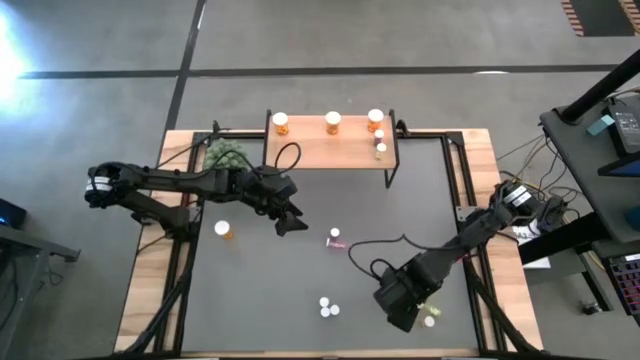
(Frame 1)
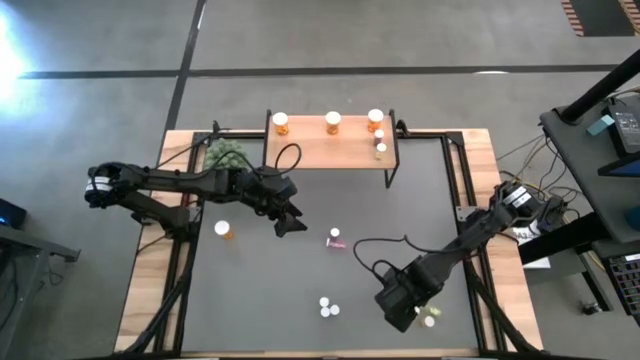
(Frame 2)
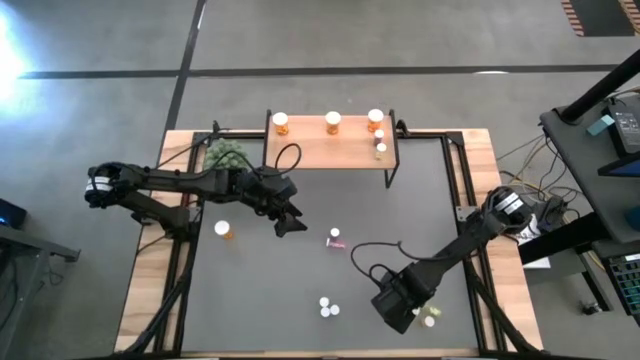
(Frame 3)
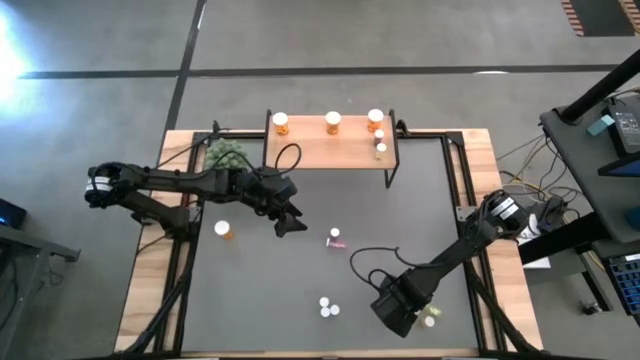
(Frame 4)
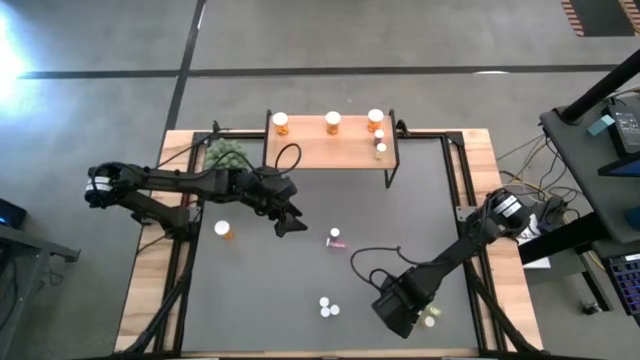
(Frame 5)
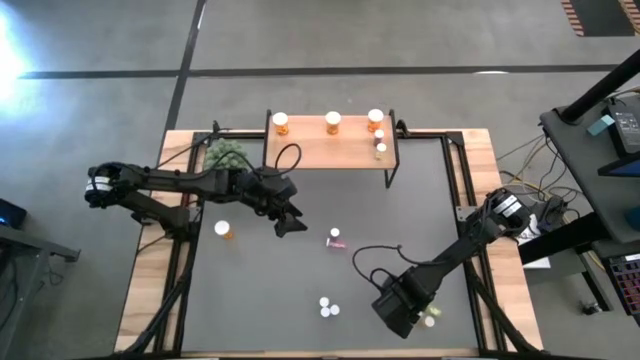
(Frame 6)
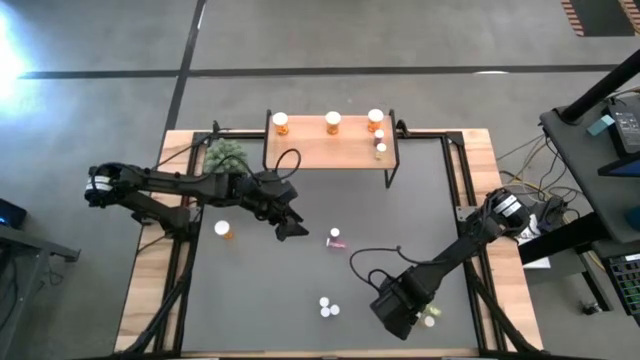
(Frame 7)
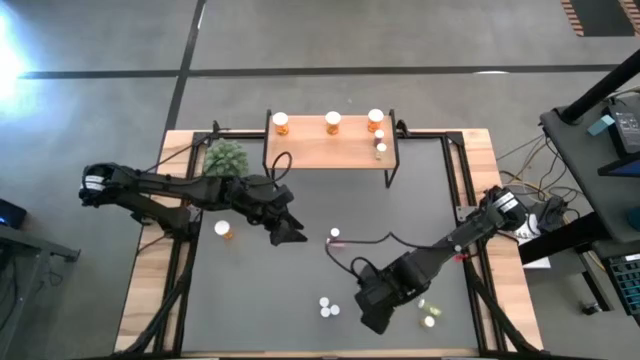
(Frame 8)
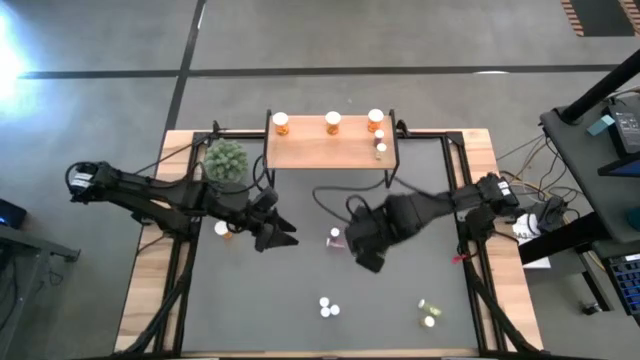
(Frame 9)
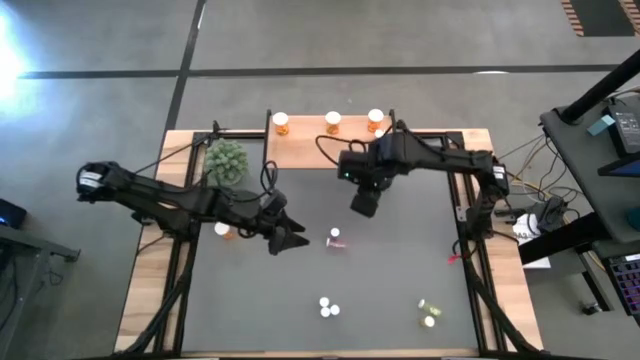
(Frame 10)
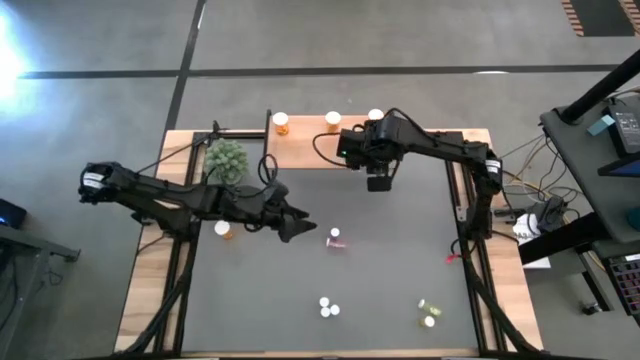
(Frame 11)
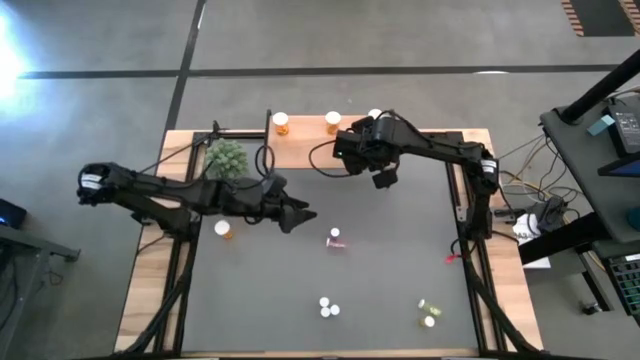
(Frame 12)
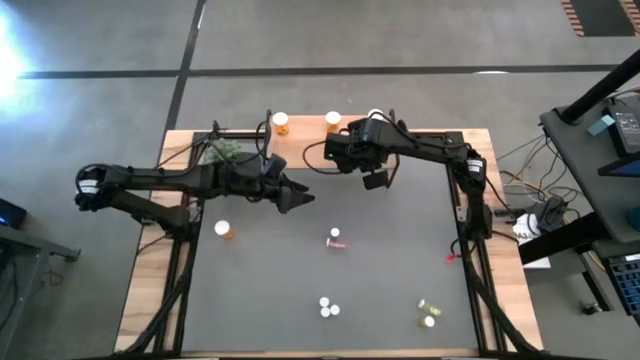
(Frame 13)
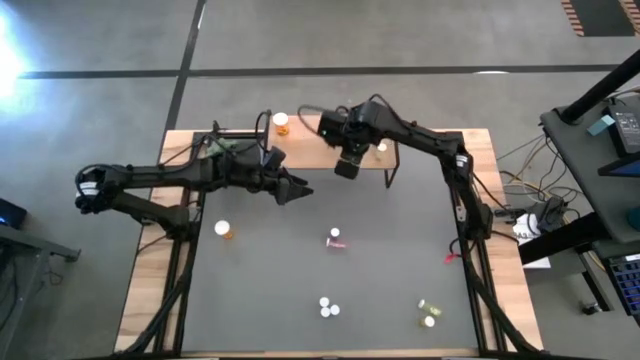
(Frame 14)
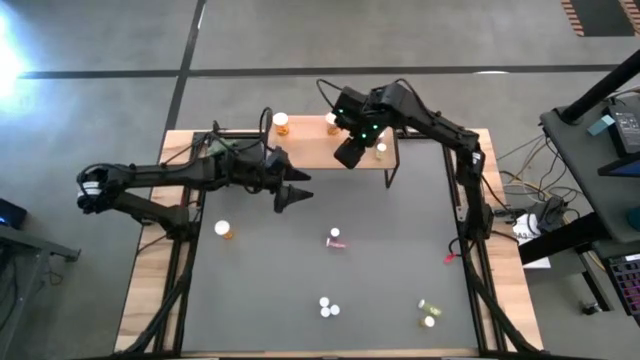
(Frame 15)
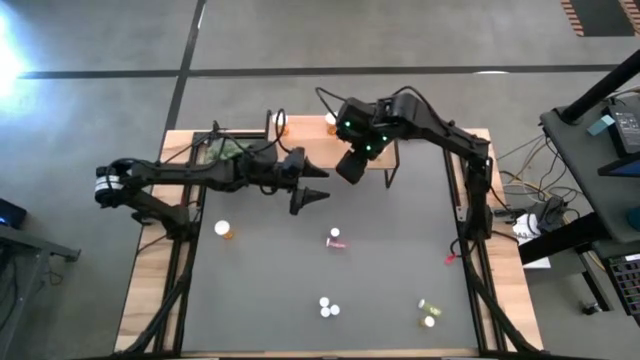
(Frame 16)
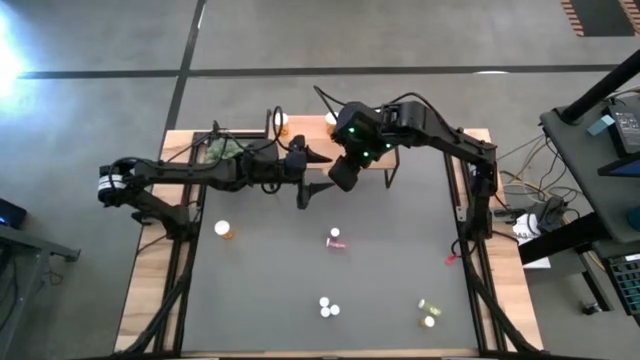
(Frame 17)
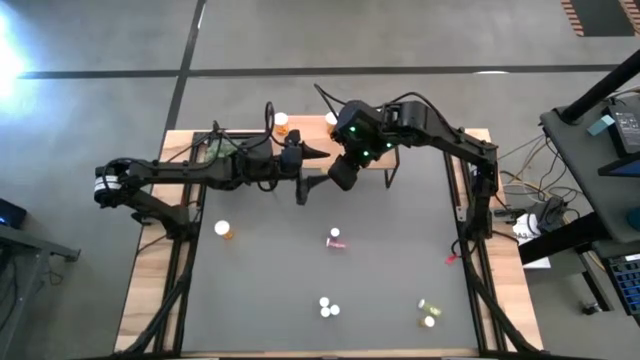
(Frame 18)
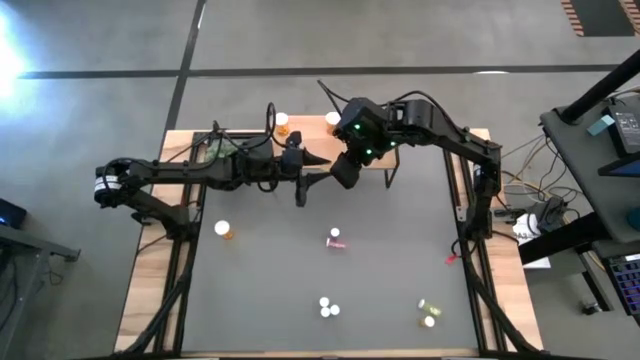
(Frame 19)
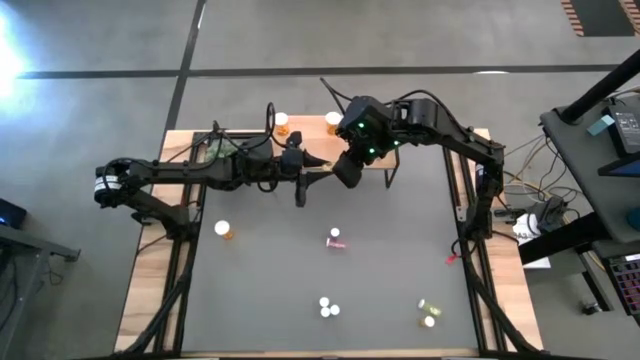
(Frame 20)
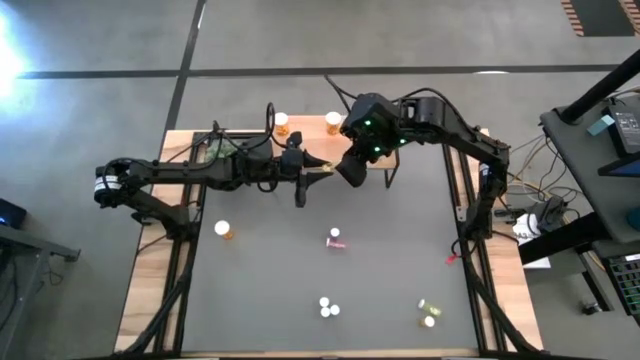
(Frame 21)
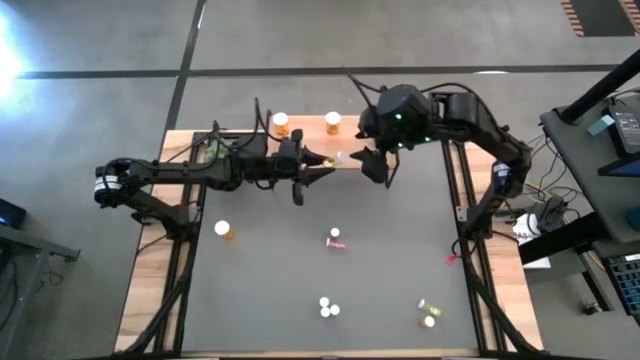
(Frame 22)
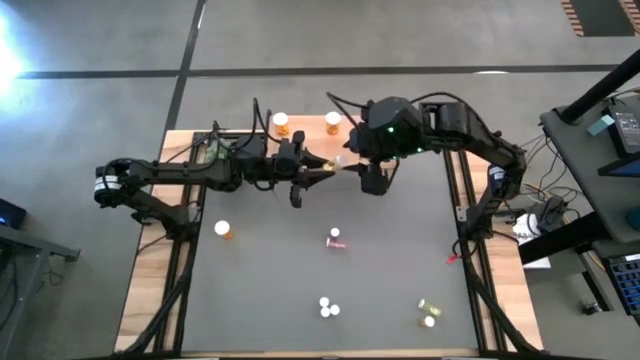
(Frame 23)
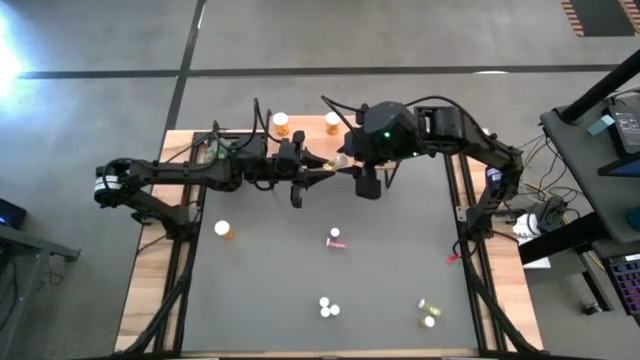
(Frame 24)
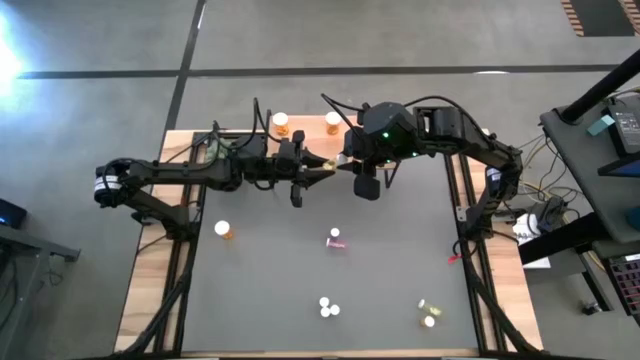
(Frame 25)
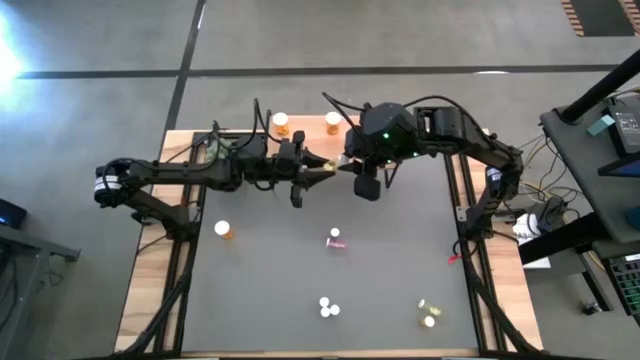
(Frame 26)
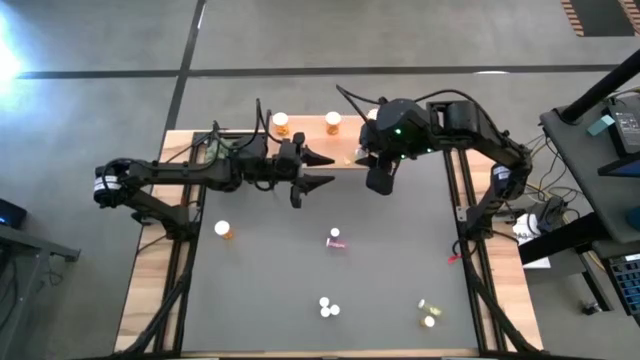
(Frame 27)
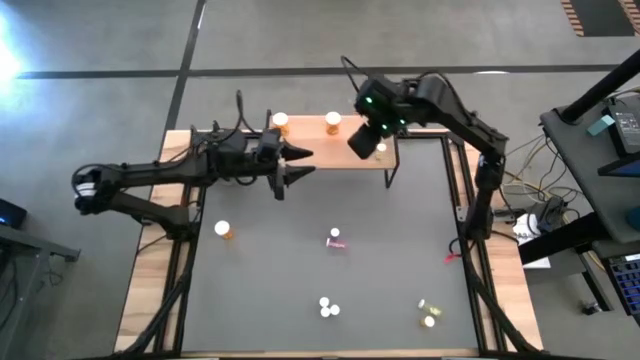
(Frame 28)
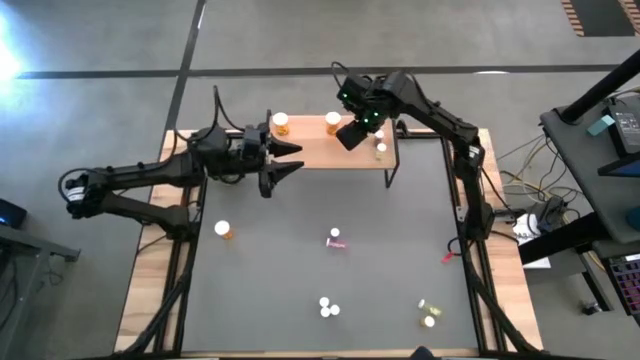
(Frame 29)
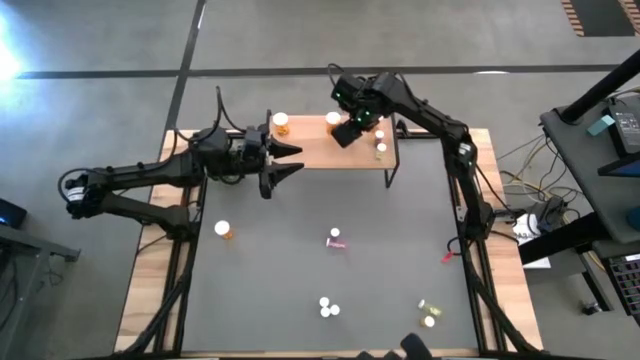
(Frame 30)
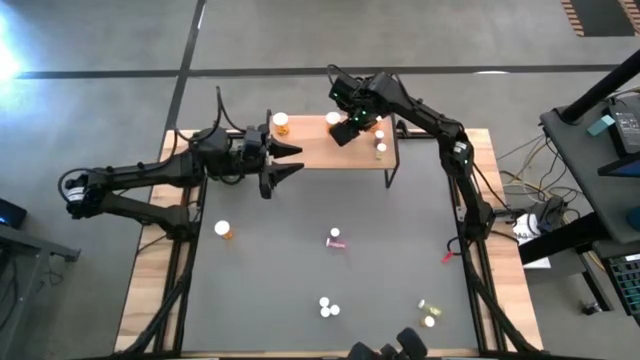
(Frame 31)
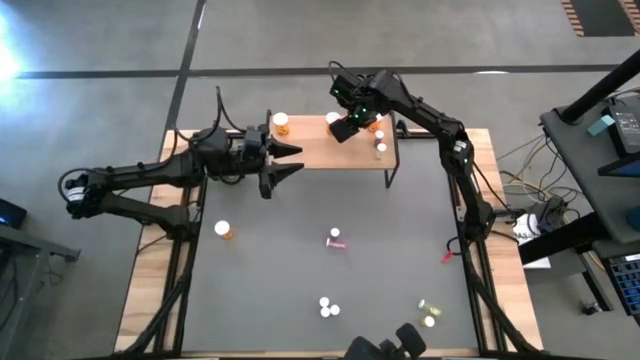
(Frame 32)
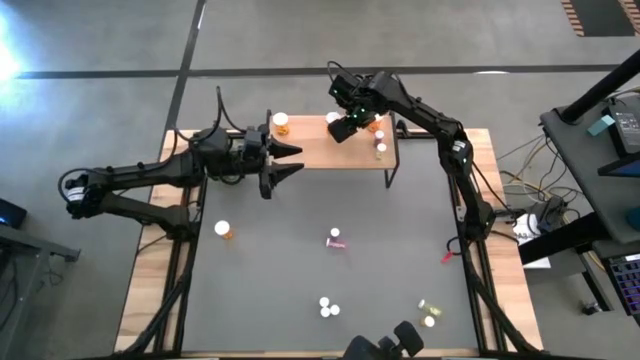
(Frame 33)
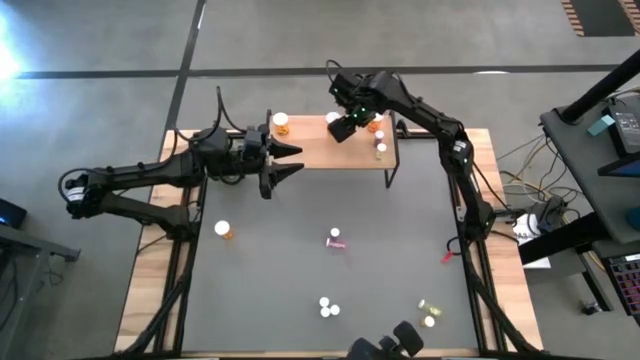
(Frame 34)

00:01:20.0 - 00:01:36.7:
Task: Pick and place medicine bottles onto shelf by color
Put the small yellow pill bottle on the shelf

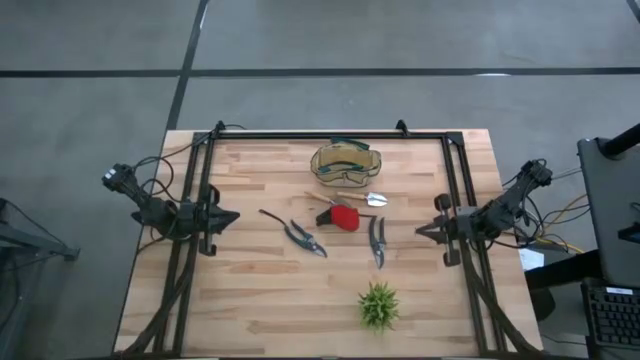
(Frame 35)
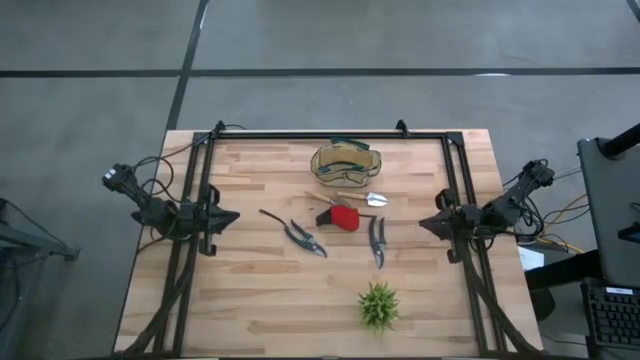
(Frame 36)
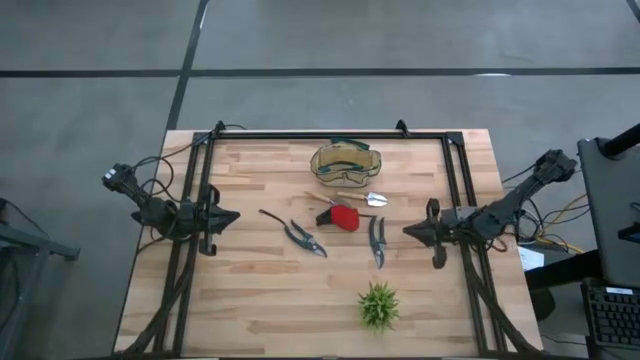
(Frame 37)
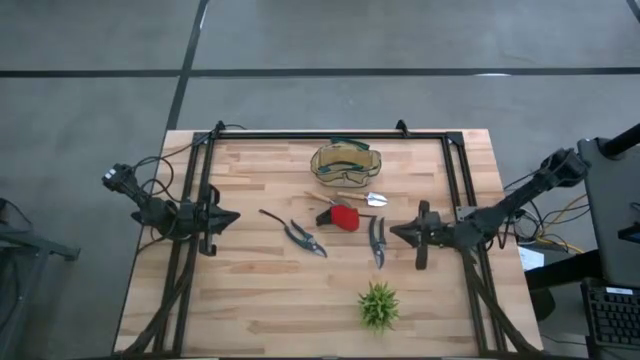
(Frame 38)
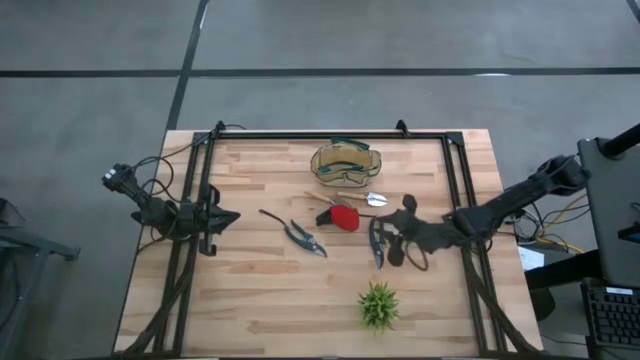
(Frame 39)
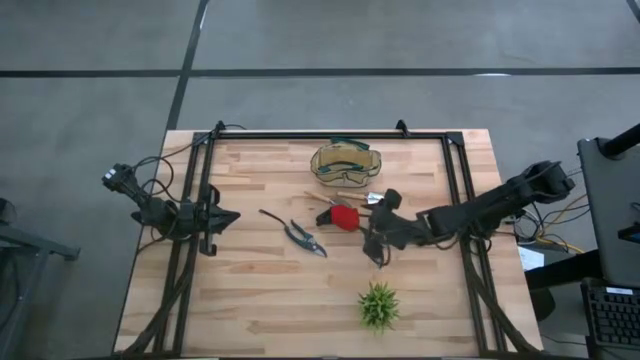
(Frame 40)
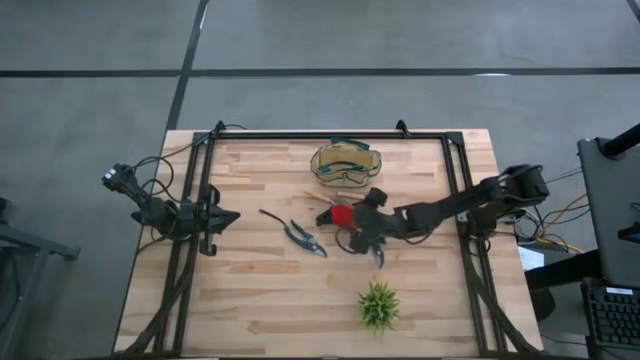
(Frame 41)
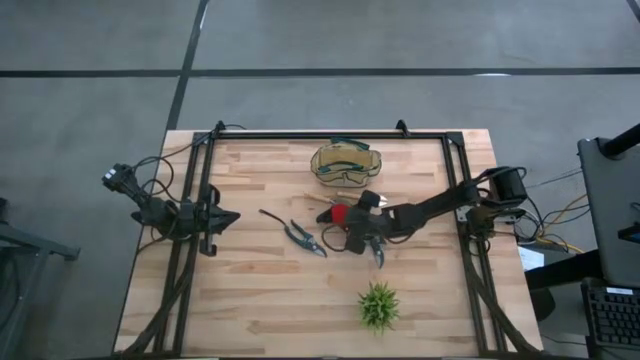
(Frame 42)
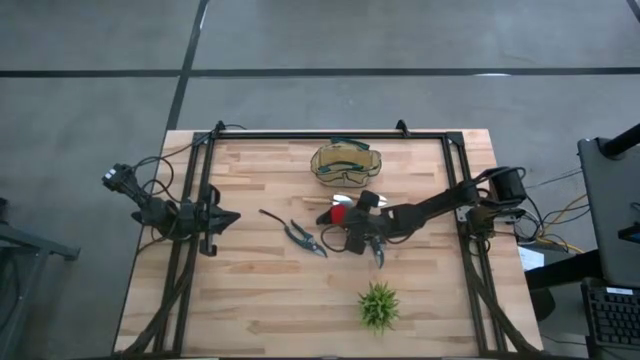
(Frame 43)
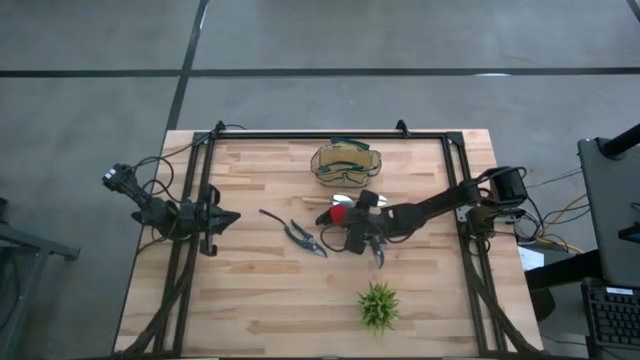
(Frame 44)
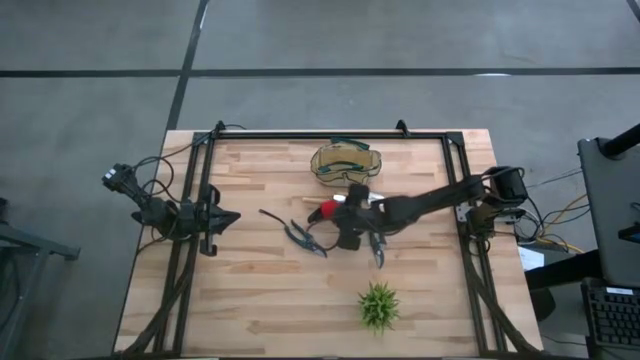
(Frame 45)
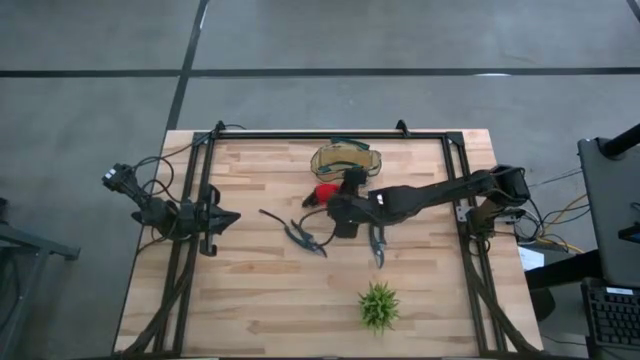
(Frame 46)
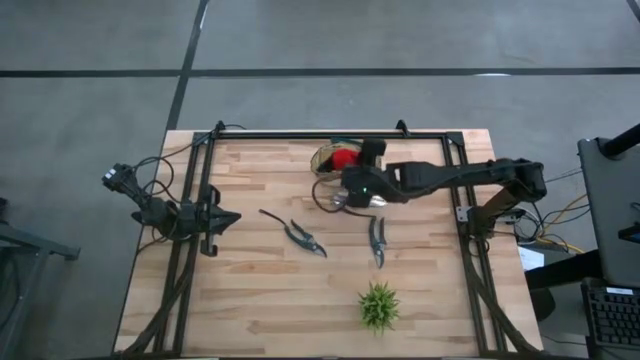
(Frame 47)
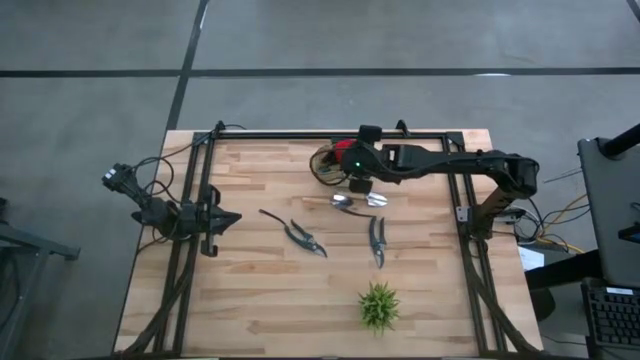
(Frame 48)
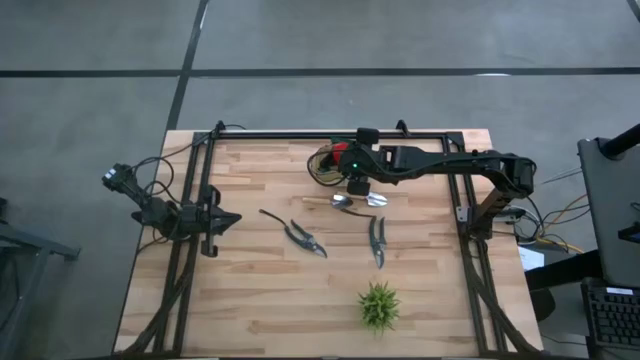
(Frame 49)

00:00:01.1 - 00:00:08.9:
Task: Pick & Place Garden tools in Gardening bag
Put the red gloves into the gardening bag
